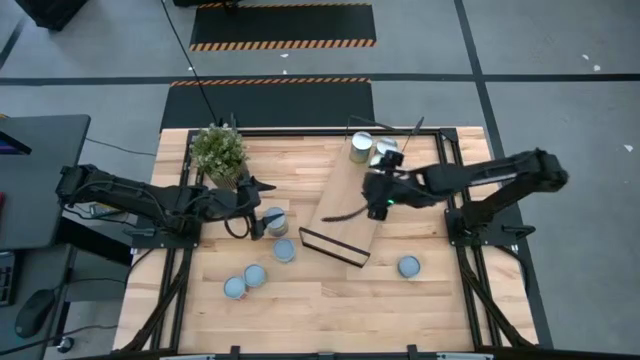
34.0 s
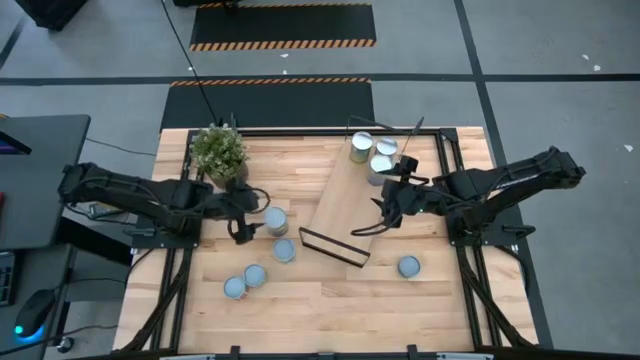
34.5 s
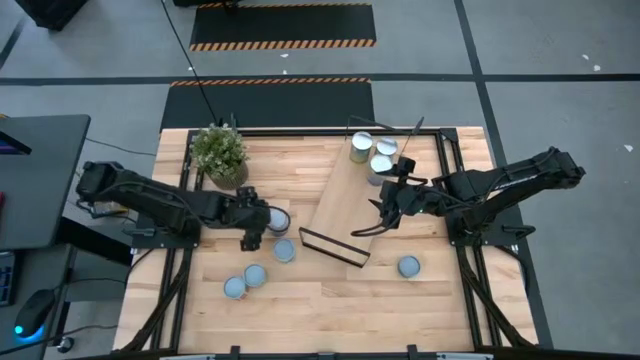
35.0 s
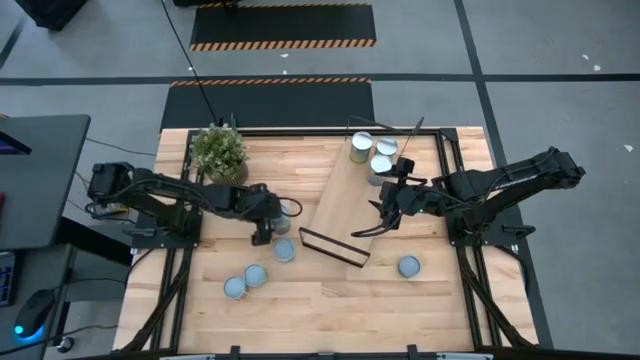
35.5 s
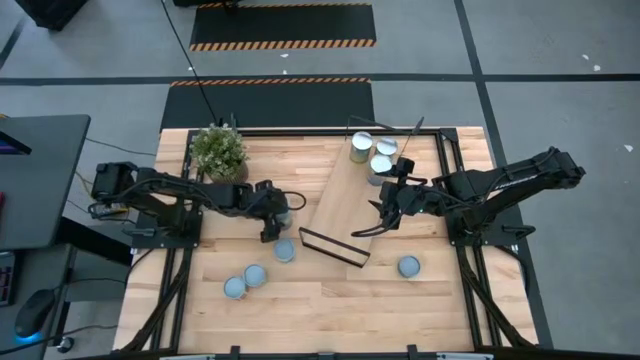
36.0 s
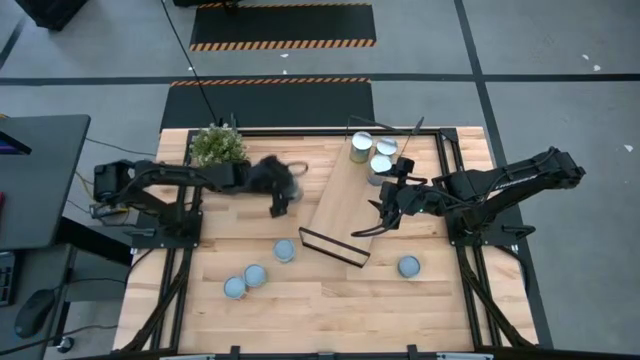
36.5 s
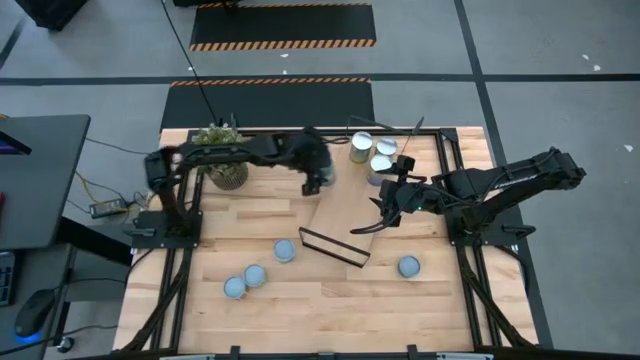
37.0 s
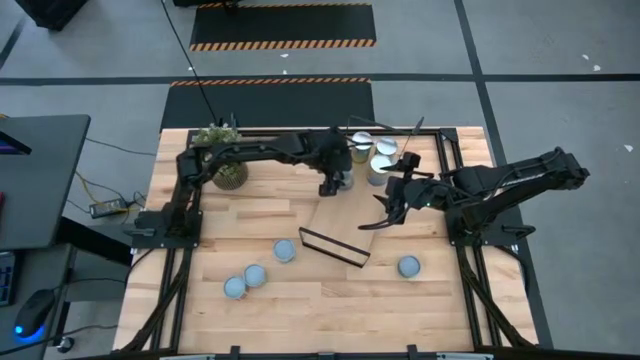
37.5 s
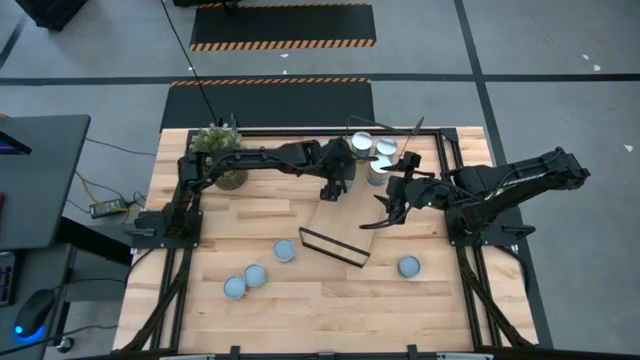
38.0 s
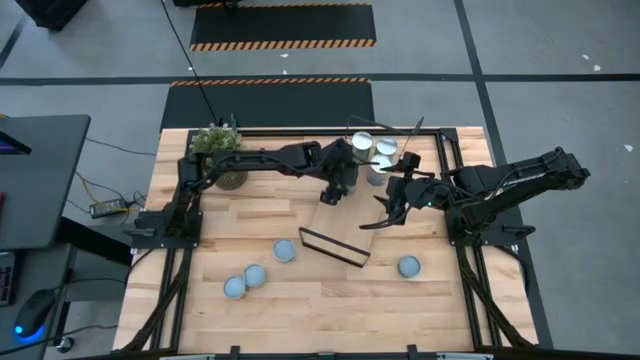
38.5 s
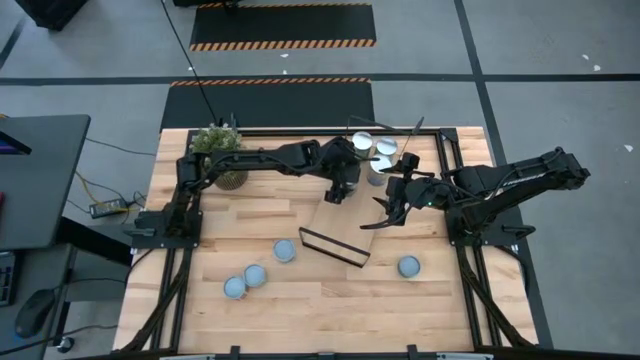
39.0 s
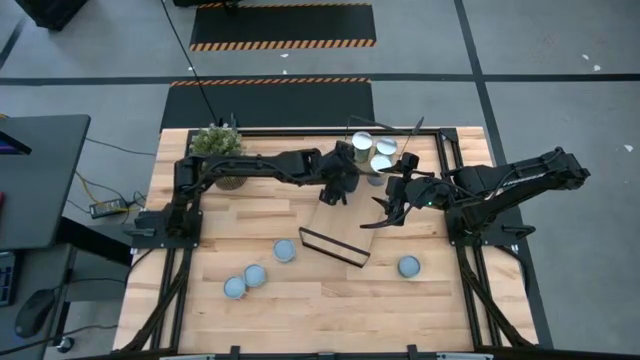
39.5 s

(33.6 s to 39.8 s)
Task: Pick and place cans onto a shelf
Put the canned peas on the shelf

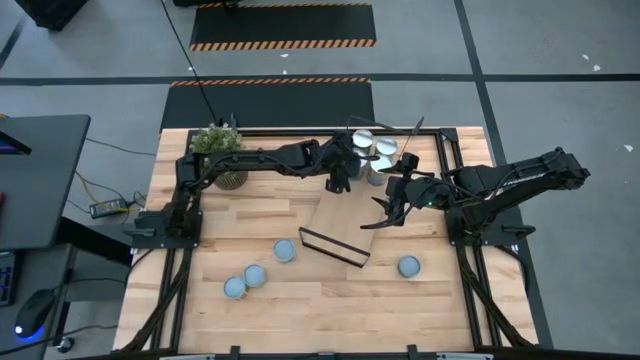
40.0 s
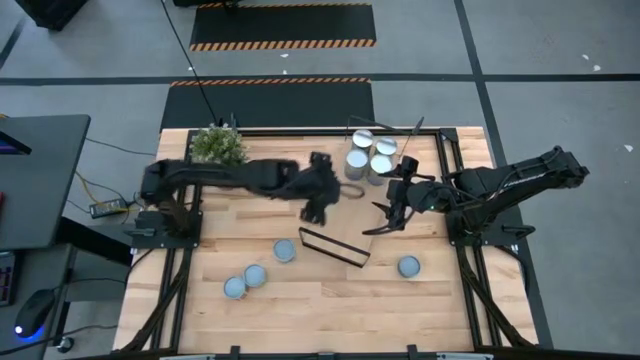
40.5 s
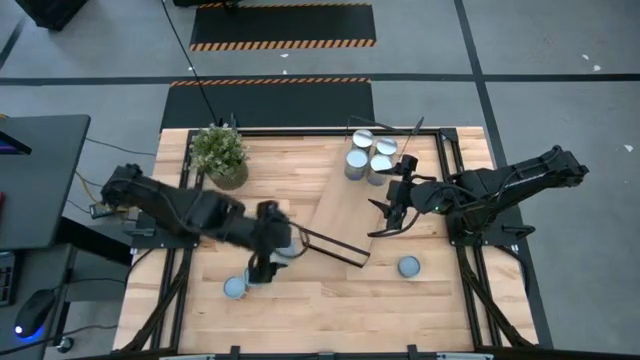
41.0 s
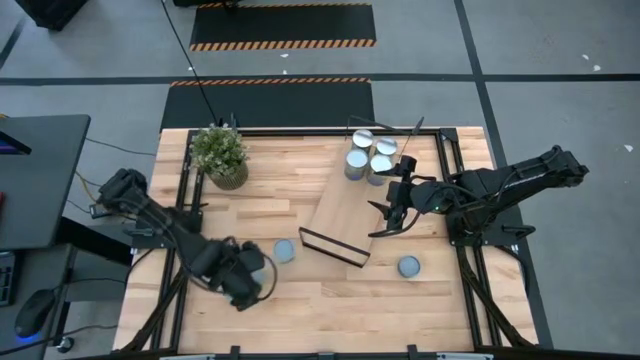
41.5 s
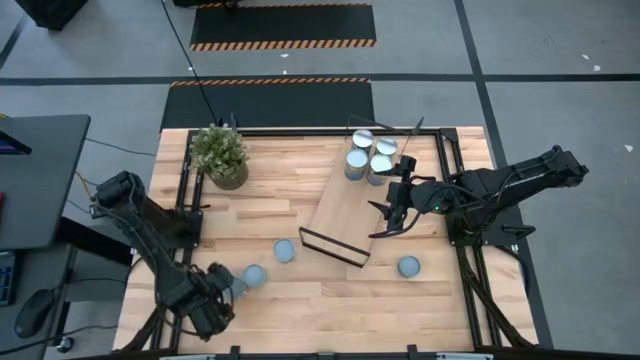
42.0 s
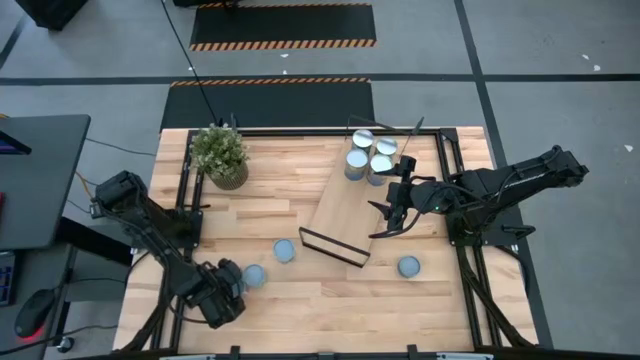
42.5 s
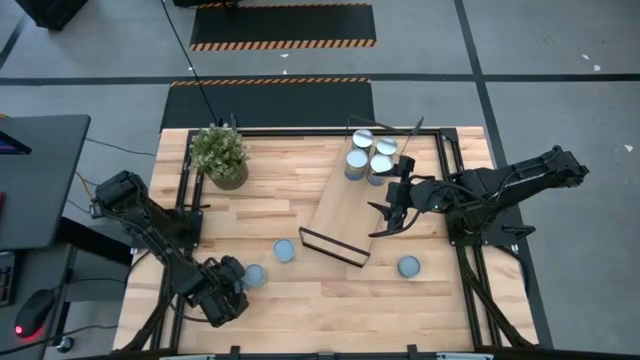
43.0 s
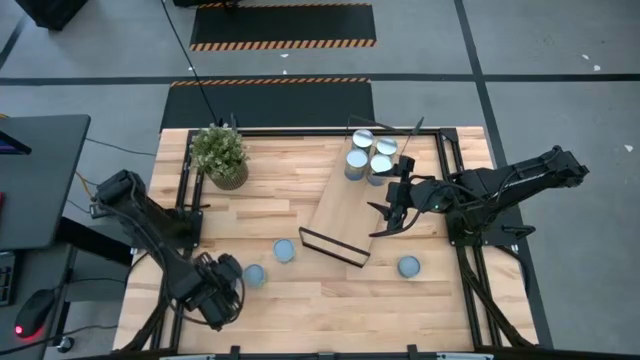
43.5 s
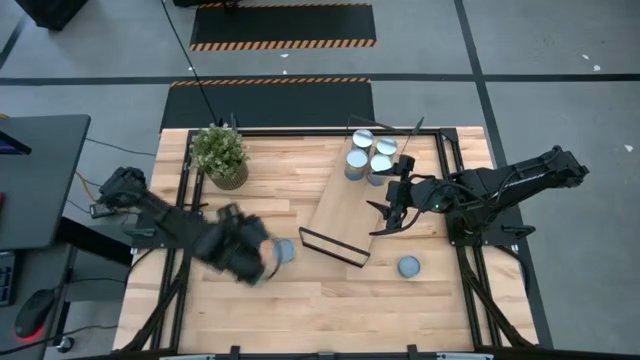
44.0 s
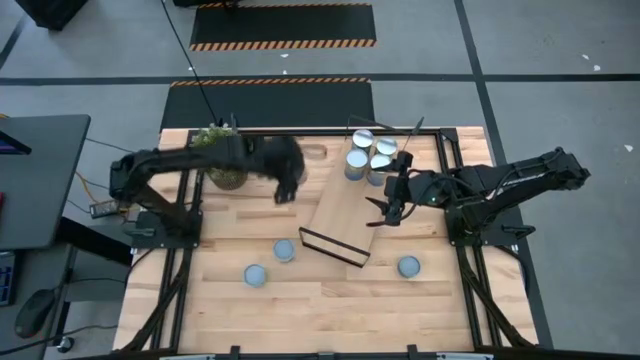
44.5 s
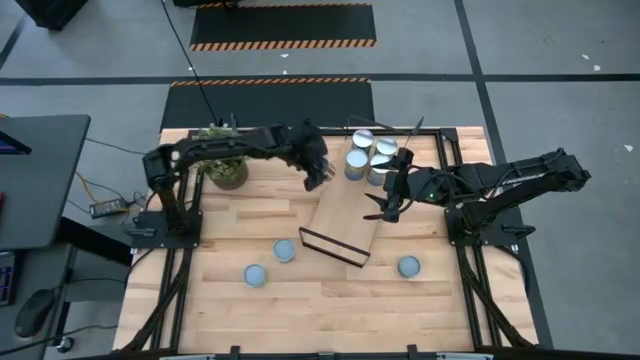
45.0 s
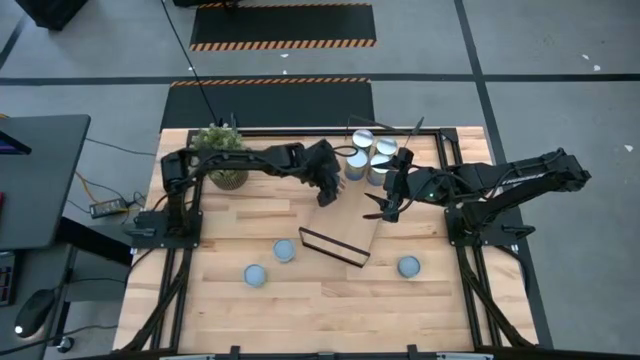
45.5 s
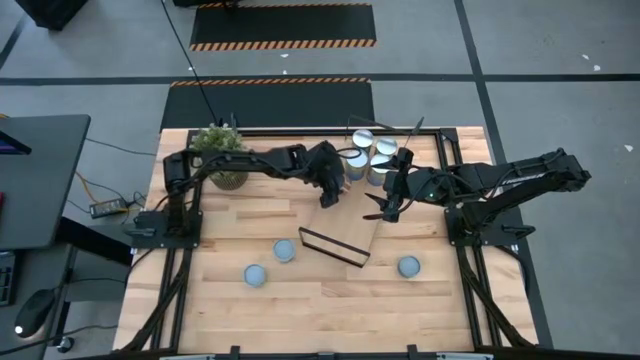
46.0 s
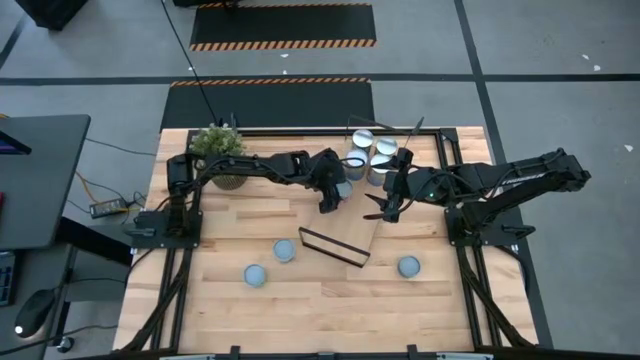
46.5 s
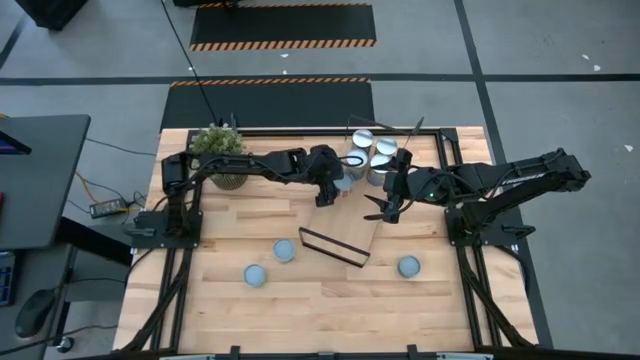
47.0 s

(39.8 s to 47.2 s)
Put the canned tomatoes on the shelf

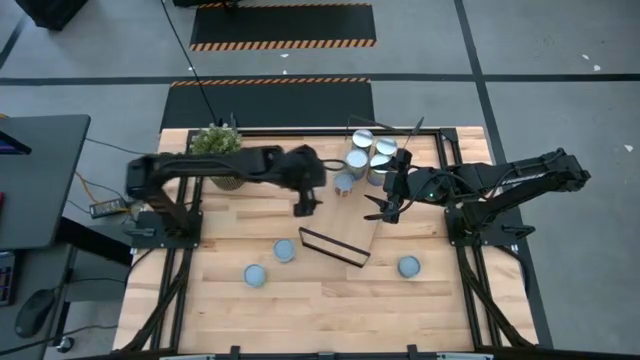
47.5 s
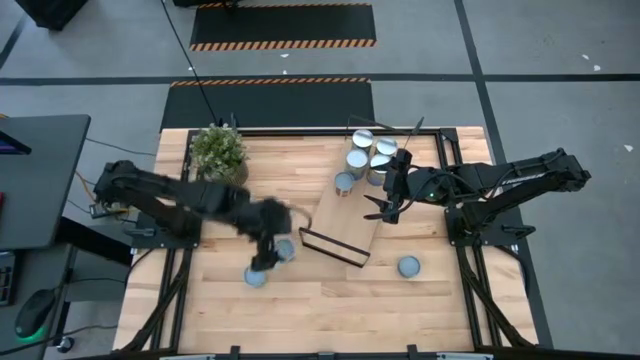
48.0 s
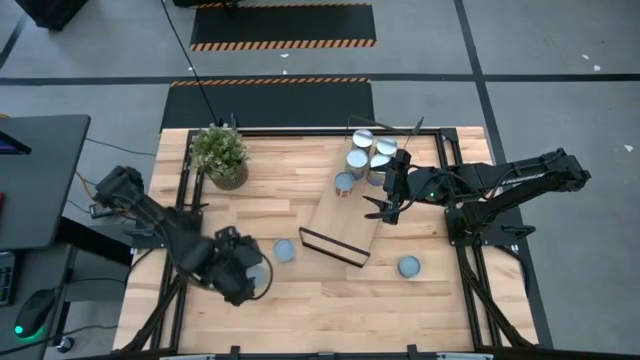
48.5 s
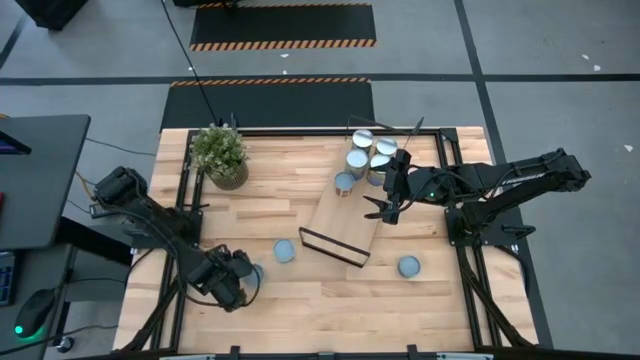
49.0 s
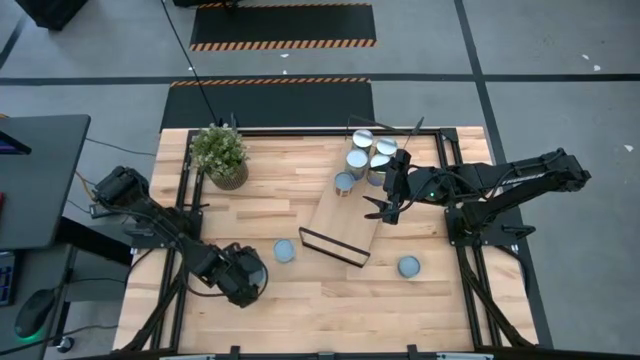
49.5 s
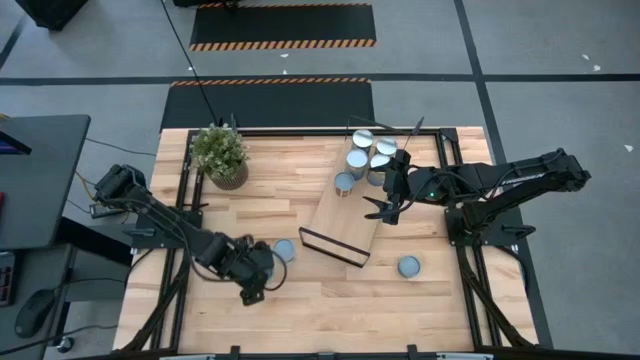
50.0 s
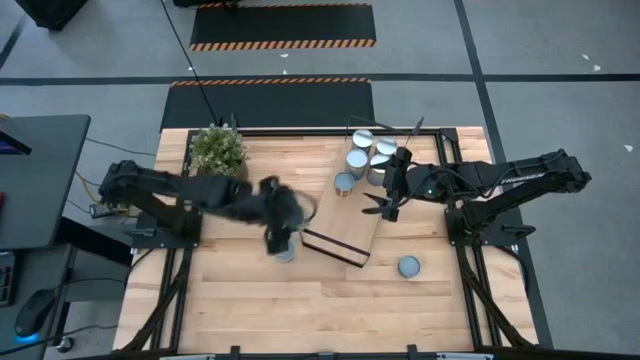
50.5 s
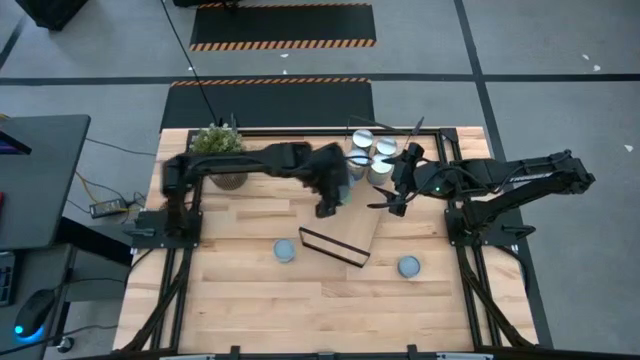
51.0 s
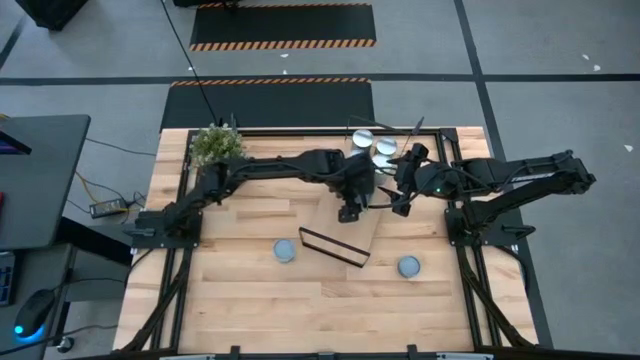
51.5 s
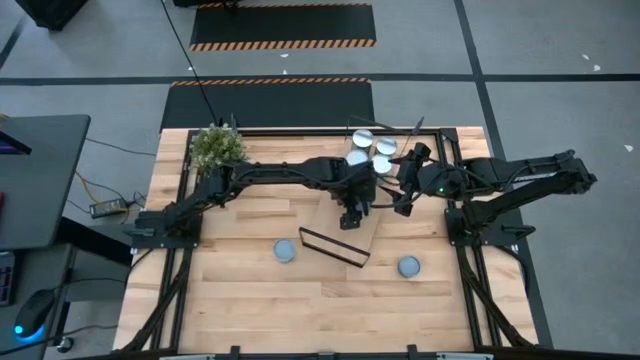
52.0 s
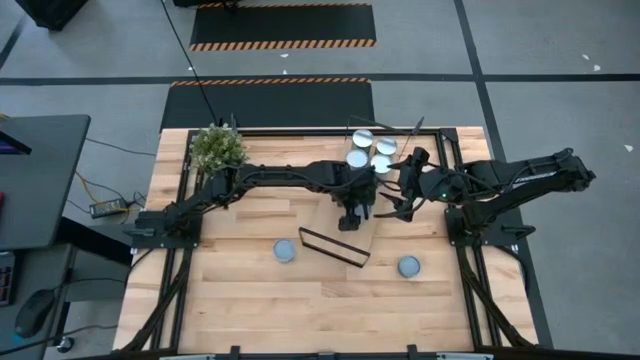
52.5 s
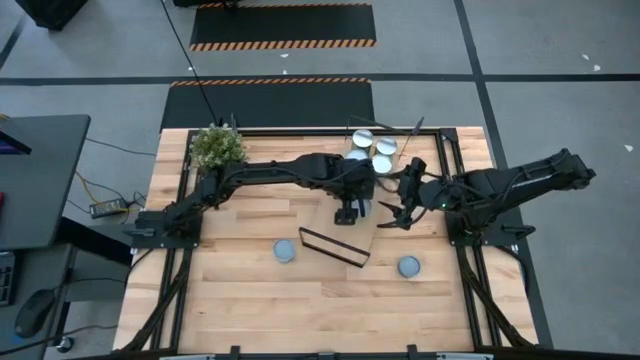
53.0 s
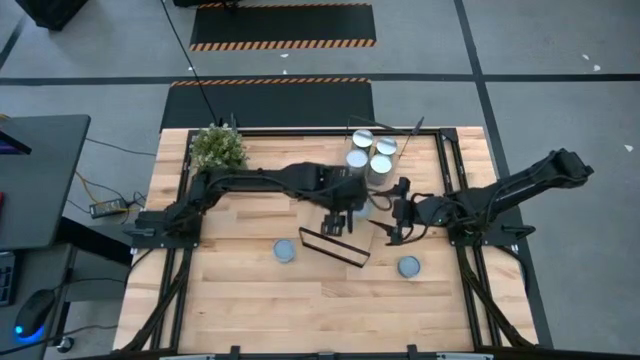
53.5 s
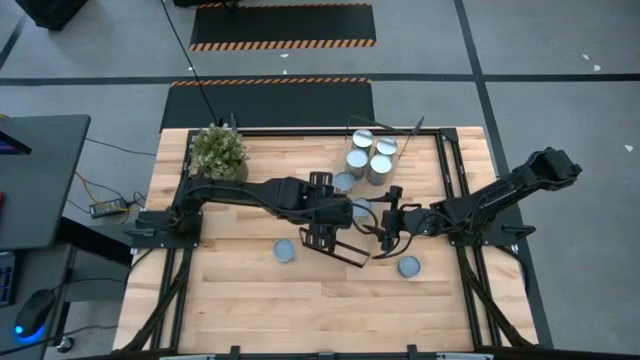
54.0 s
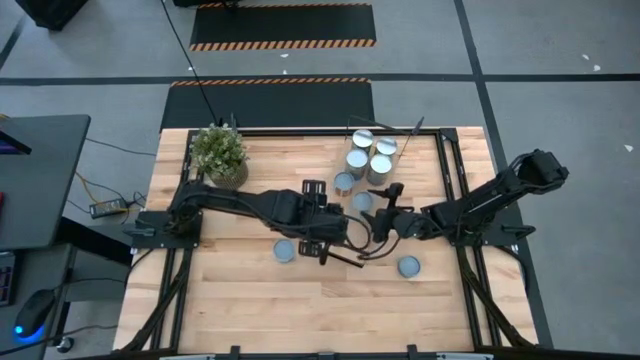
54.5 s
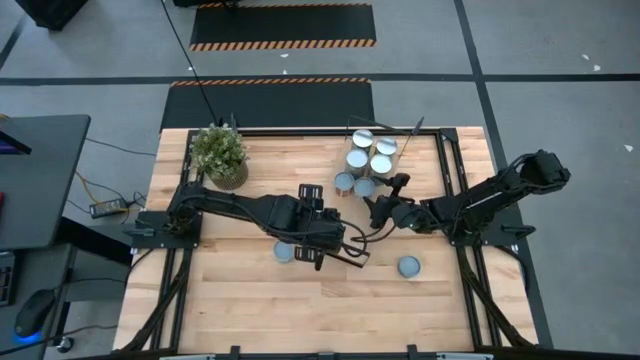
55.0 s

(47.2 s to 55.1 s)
Put the canned peas on the shelf
